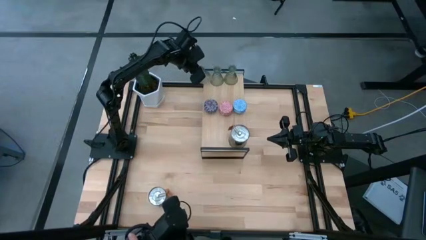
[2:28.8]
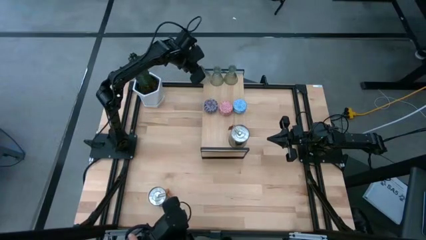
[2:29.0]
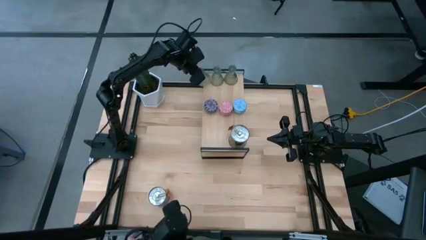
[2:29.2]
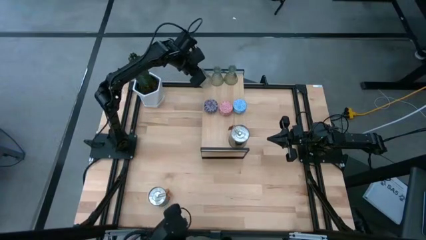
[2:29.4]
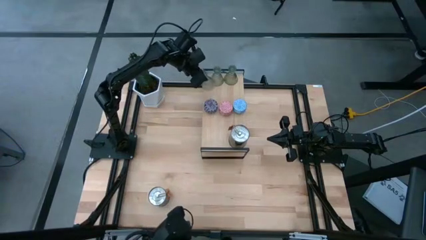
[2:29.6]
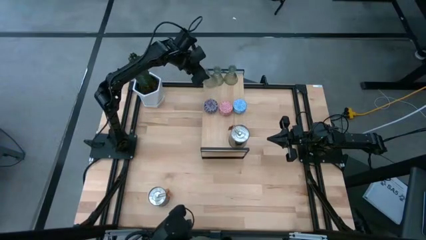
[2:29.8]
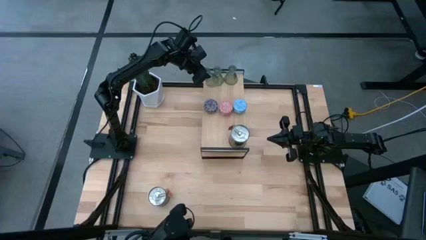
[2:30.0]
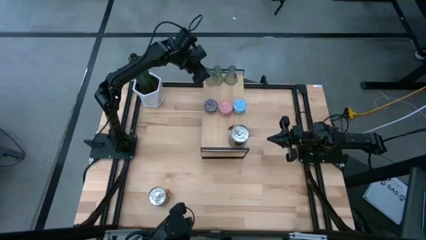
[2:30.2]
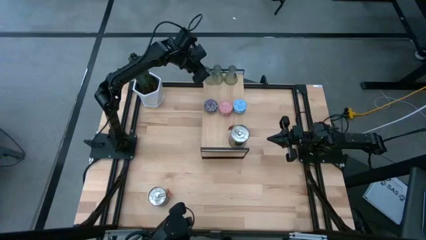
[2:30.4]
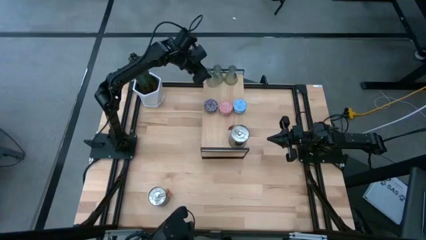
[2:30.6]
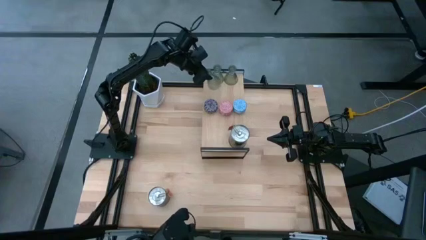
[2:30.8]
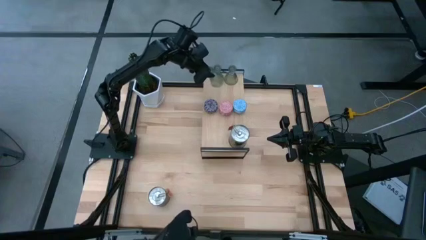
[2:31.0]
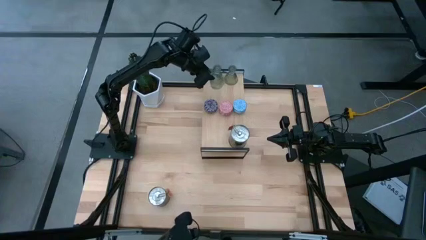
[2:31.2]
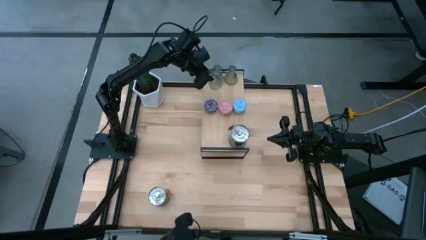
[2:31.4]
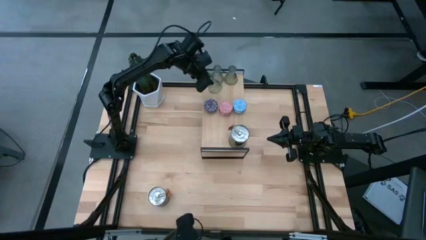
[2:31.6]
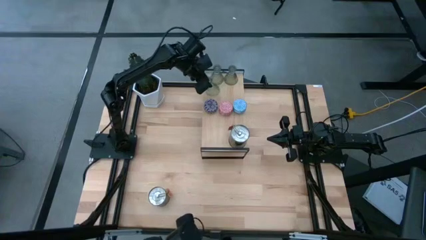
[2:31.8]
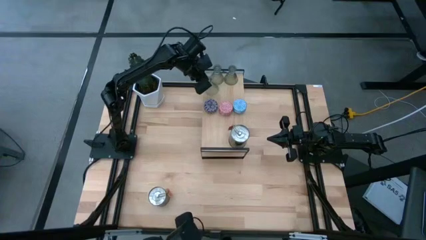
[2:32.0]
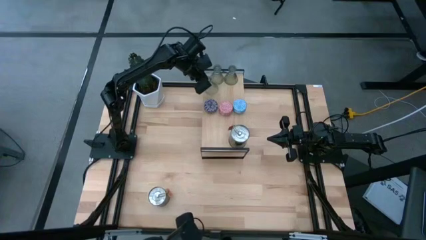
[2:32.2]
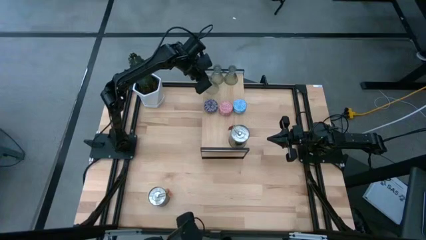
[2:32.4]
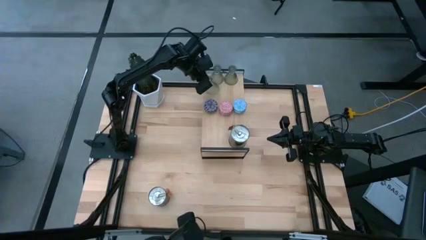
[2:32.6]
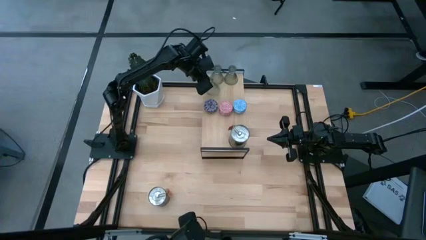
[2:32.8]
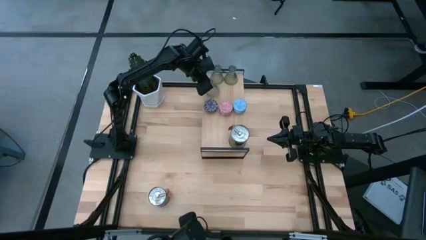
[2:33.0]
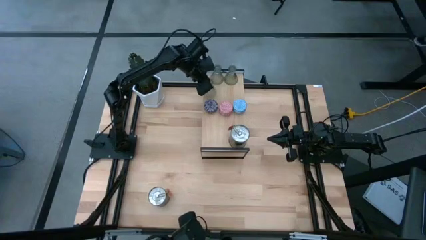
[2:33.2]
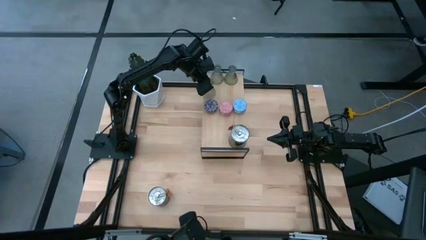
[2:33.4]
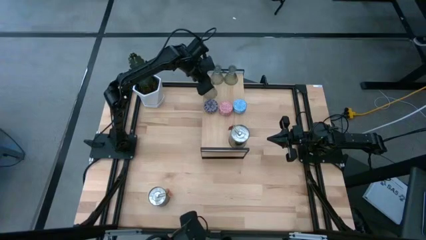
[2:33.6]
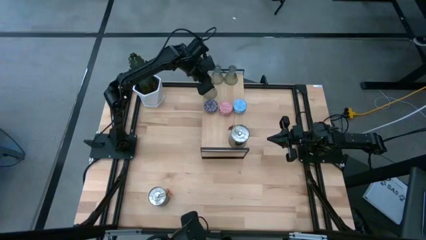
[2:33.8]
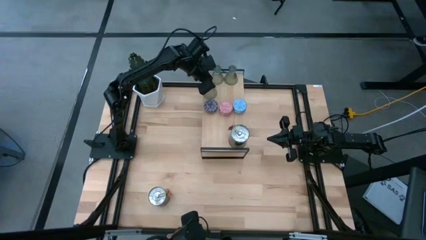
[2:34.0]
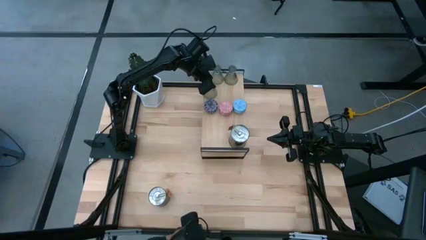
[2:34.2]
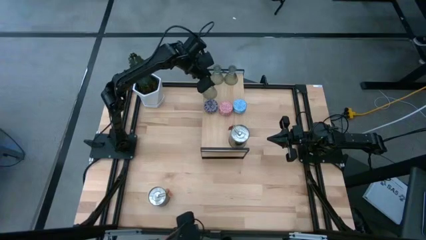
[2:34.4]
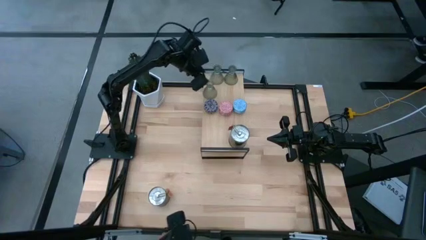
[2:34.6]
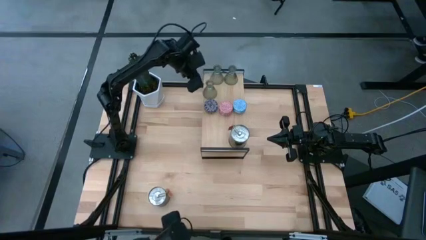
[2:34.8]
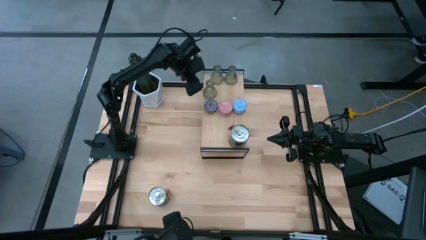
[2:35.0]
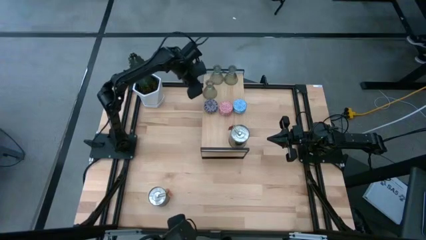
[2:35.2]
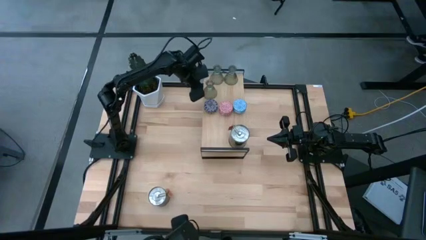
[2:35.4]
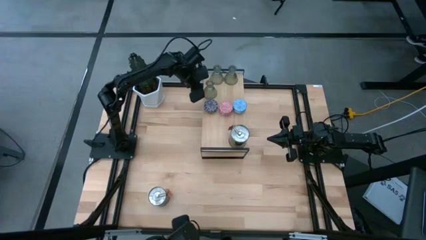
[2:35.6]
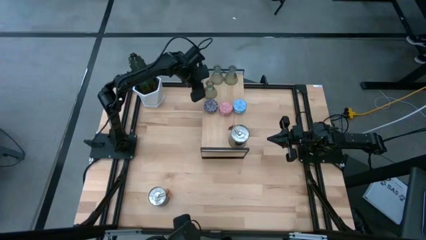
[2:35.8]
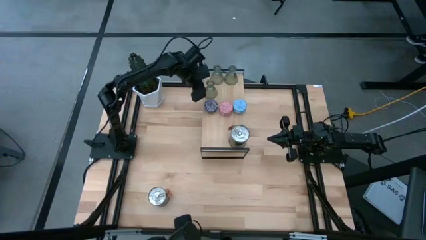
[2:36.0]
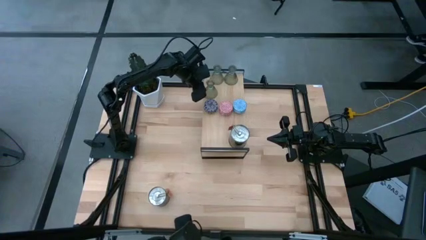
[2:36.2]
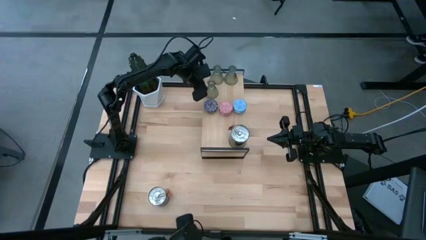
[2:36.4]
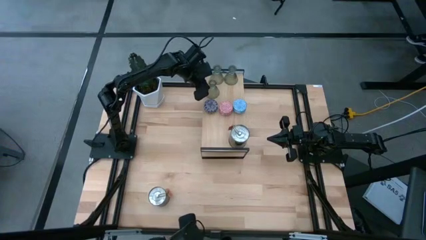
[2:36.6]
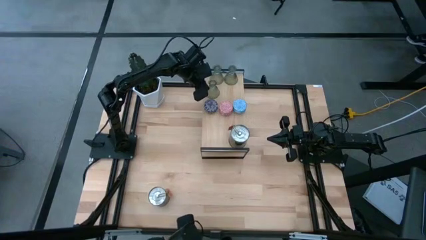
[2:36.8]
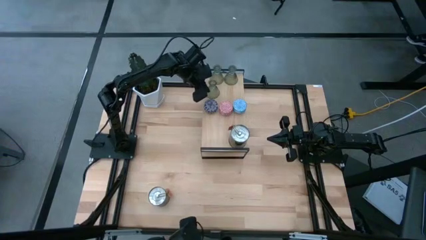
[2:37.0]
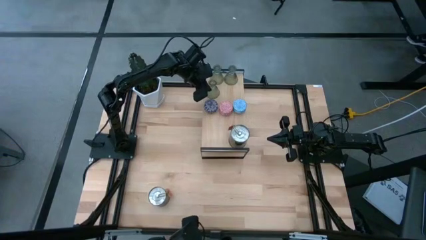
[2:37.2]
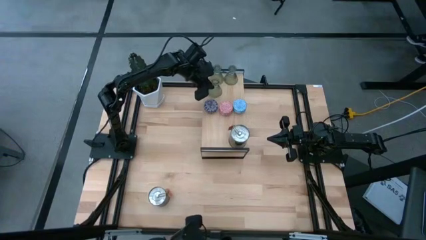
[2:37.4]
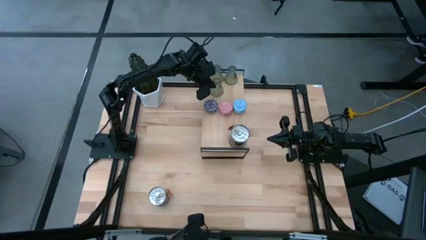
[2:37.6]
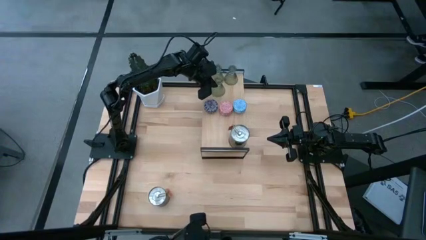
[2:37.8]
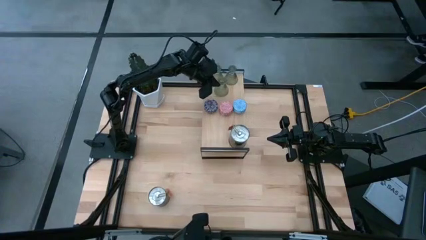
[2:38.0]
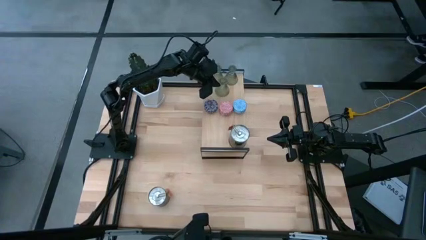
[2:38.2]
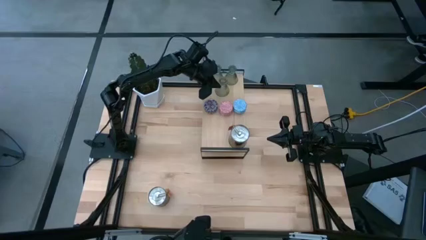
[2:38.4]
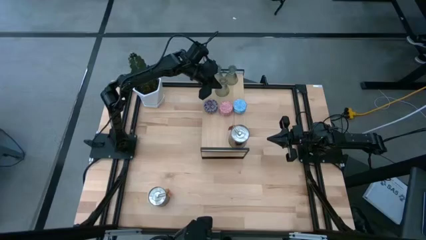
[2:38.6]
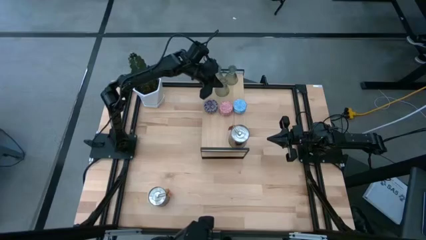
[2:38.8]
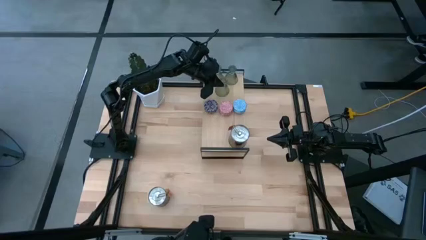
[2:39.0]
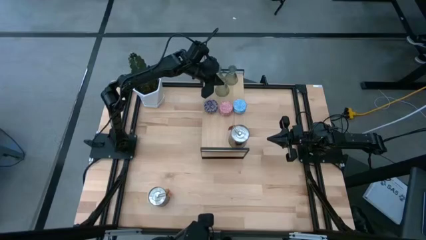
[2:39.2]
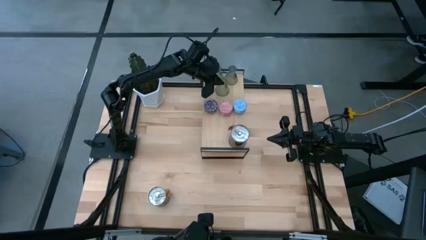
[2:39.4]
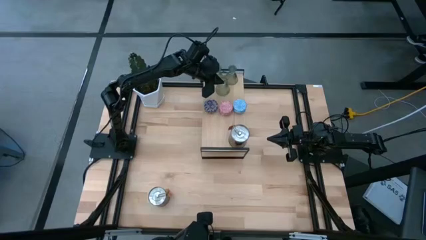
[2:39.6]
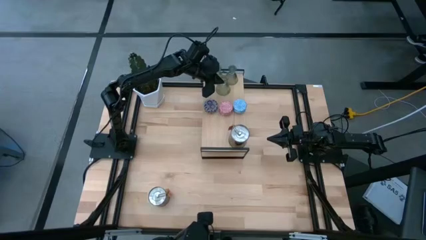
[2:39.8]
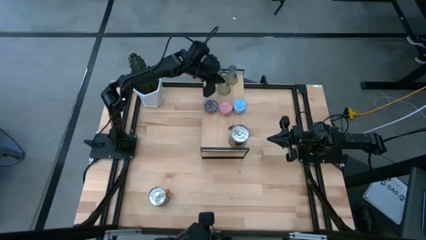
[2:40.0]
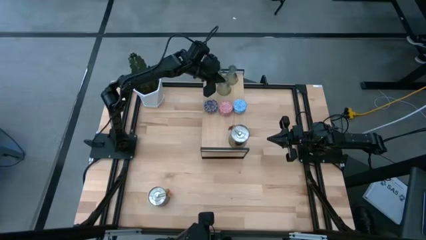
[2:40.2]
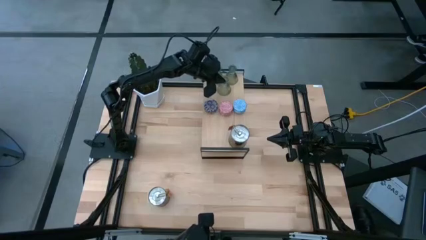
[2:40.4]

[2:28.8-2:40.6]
Task: Pick & Place candle stick holders
Put the transparent candle holder on the shelf

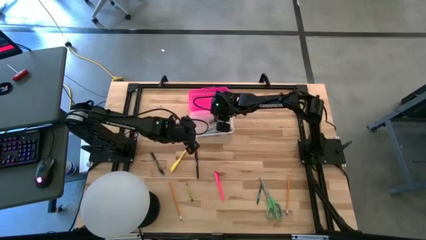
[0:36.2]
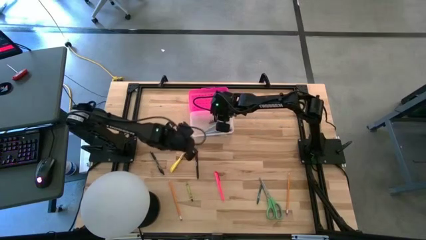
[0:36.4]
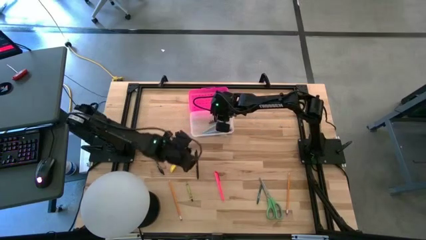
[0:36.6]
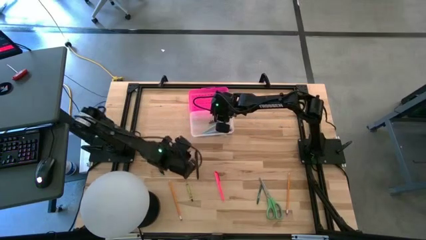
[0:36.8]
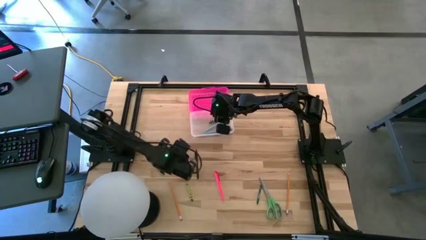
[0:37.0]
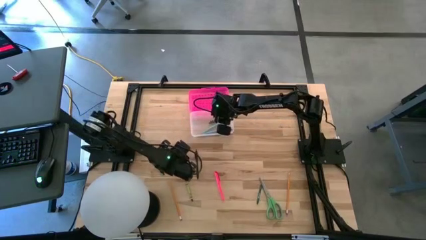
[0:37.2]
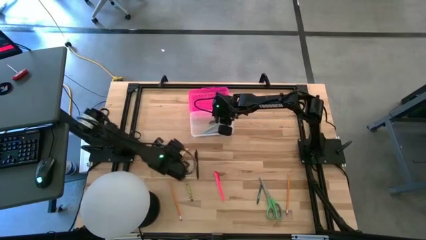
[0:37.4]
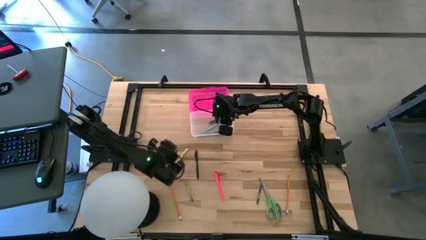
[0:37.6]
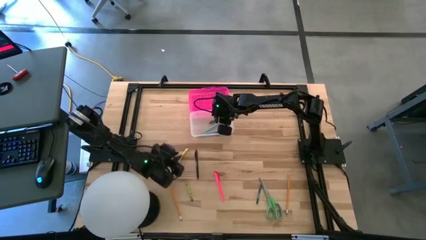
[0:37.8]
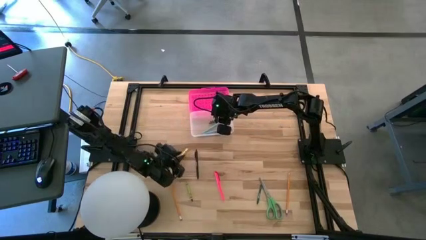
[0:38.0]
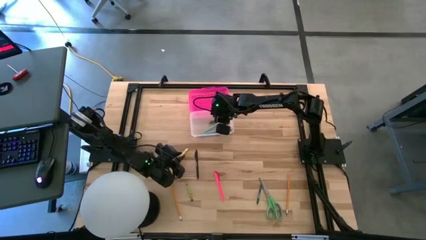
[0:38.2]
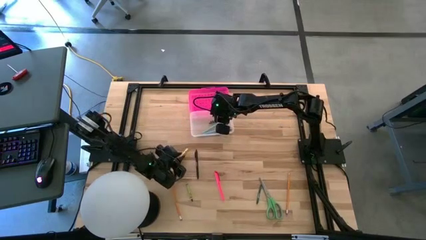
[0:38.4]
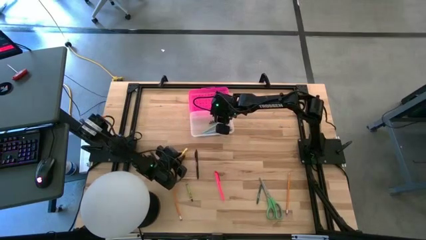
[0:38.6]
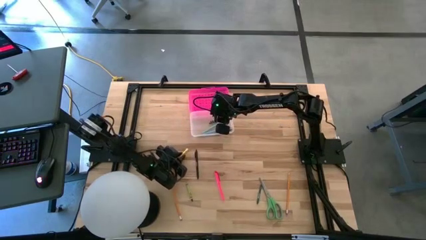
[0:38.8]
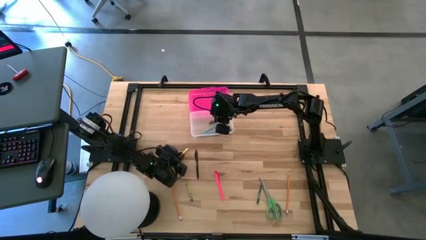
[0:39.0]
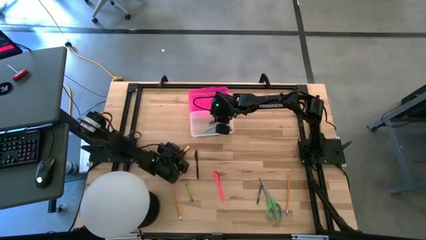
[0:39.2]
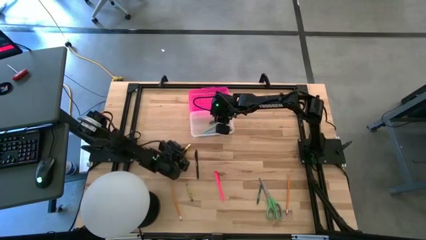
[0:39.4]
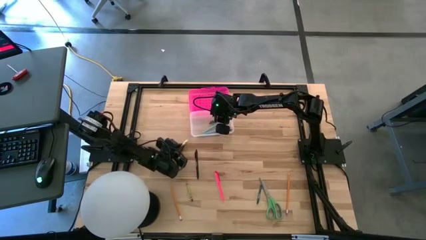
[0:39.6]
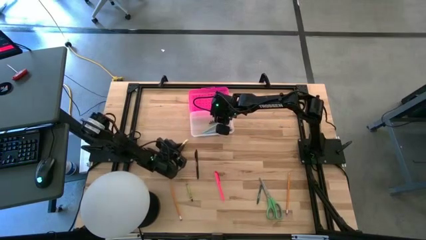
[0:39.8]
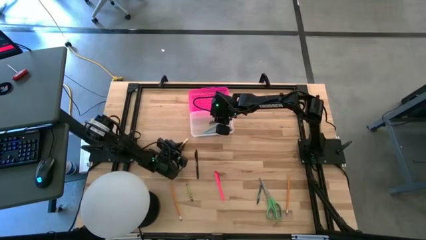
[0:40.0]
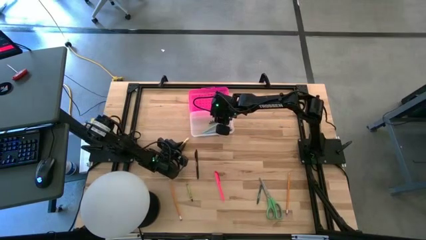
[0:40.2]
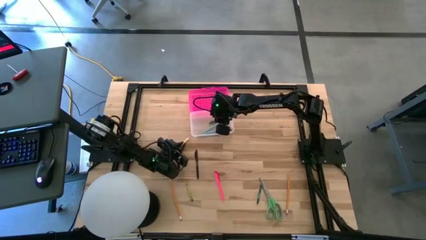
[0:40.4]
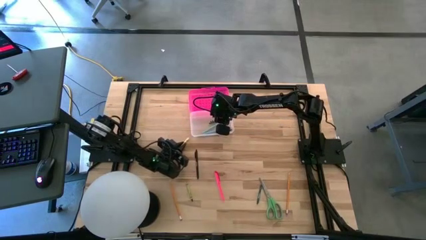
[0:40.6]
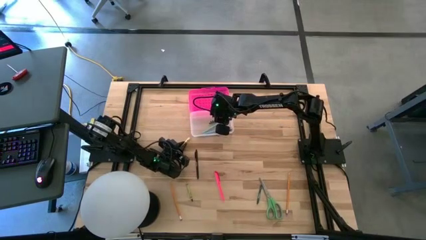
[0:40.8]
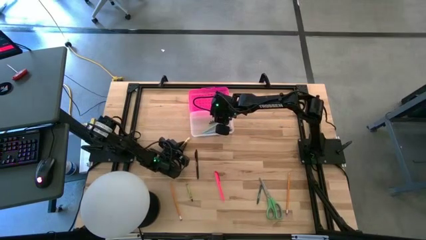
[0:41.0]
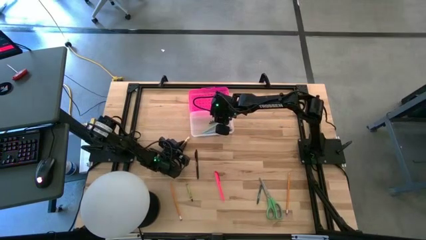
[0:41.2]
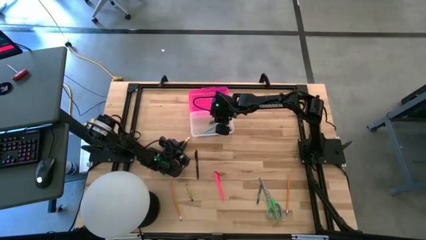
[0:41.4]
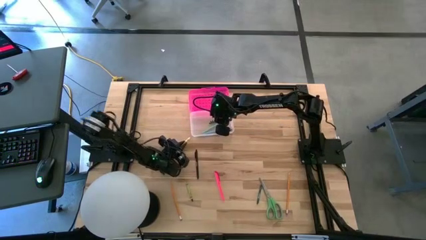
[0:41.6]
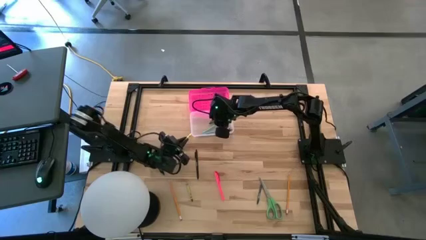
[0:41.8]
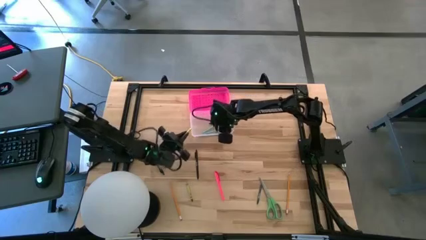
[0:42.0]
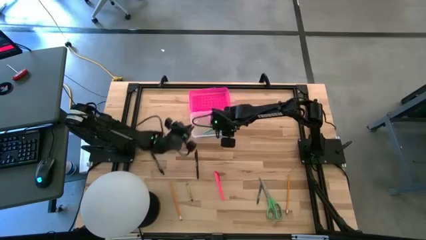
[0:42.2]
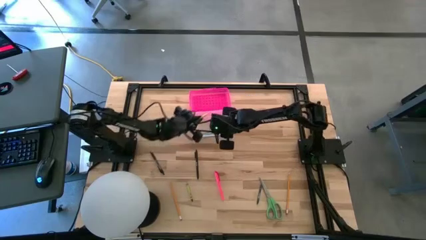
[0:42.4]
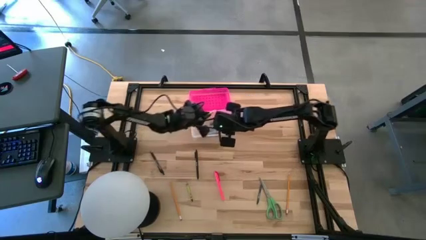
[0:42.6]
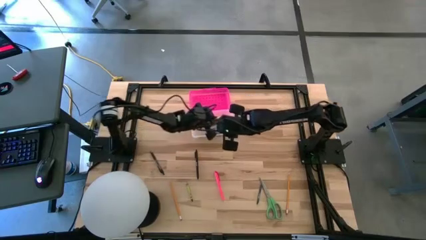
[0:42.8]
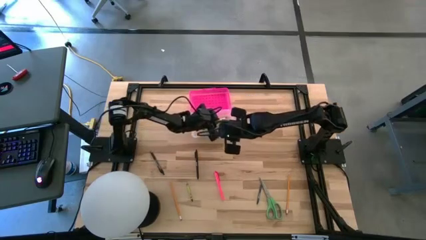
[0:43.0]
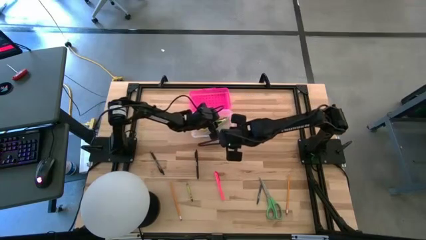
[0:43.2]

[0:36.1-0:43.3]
Task: Pick & place school supplies into a supply box
Put the yellow pen into the pink supply box
